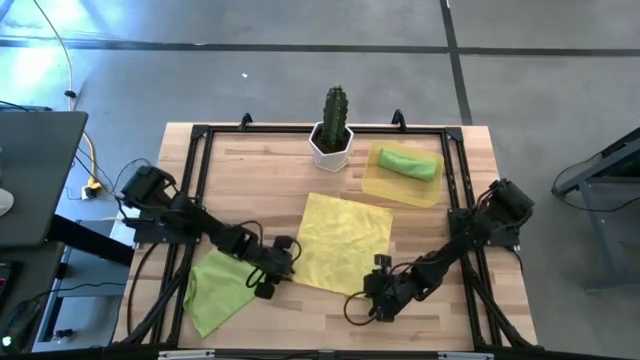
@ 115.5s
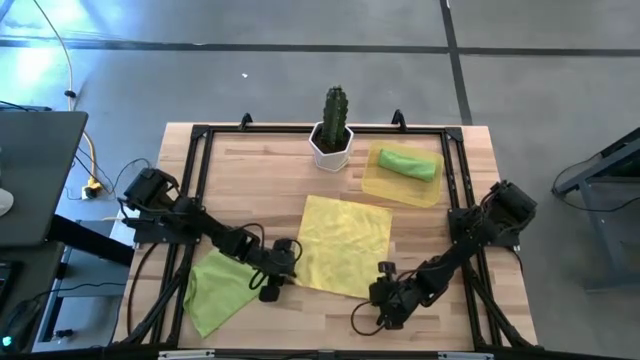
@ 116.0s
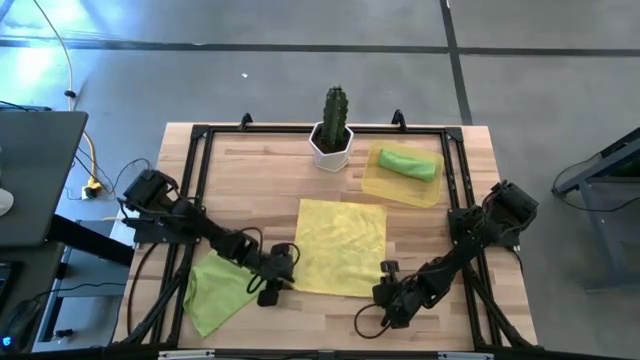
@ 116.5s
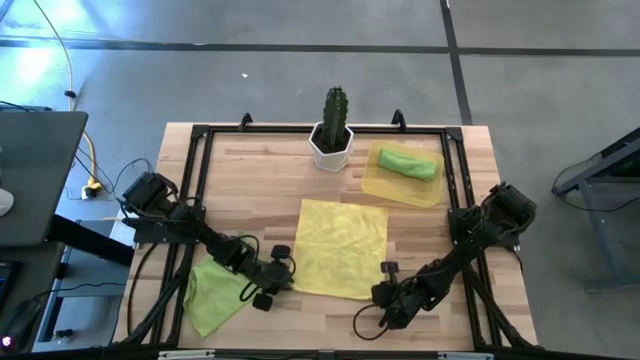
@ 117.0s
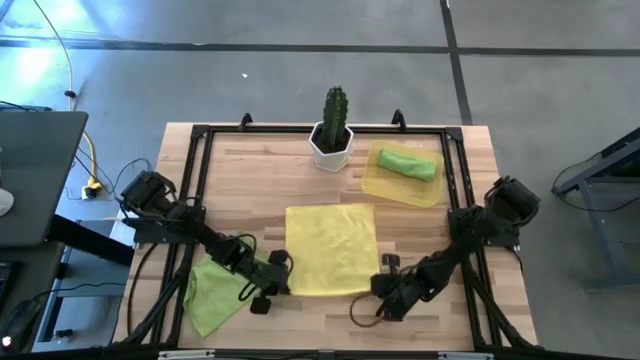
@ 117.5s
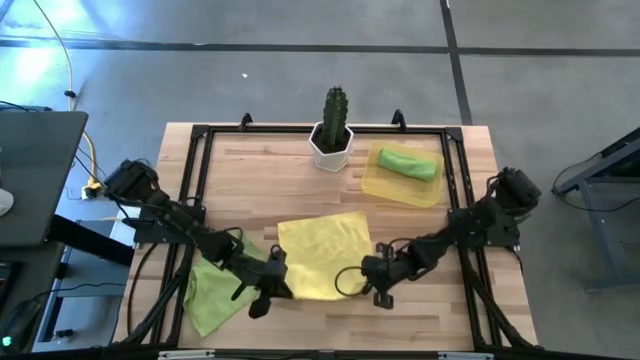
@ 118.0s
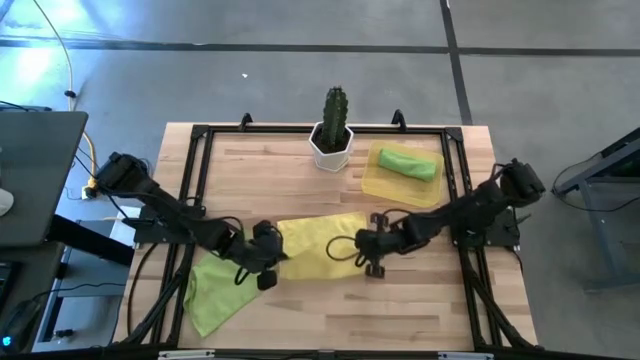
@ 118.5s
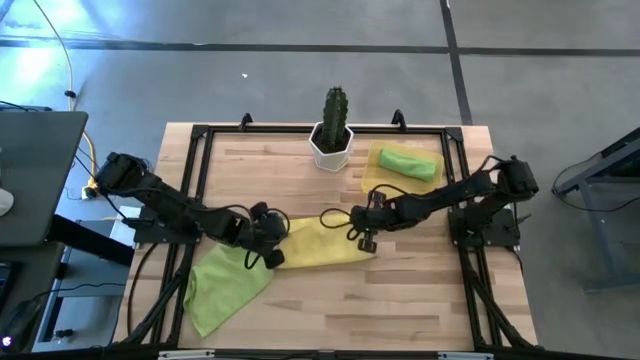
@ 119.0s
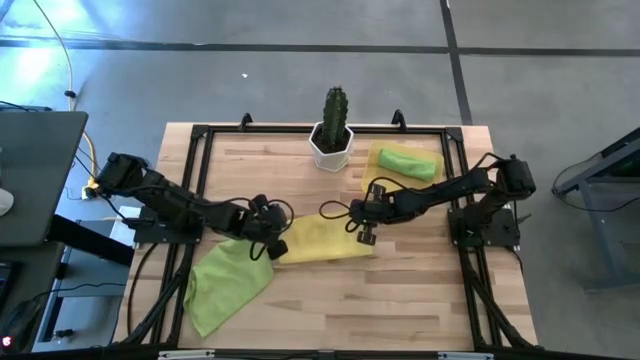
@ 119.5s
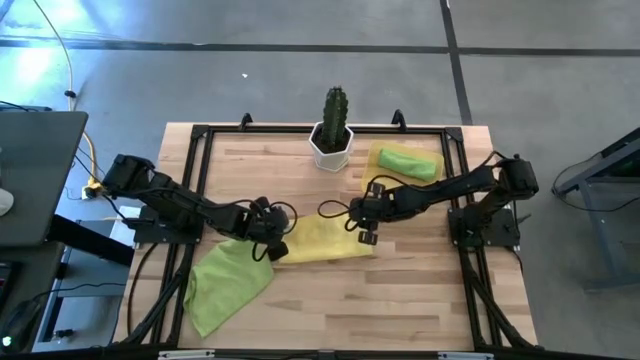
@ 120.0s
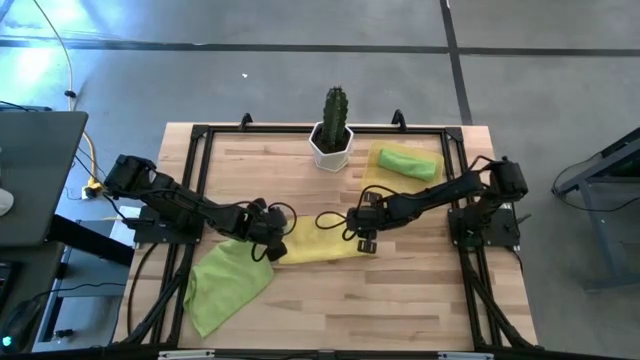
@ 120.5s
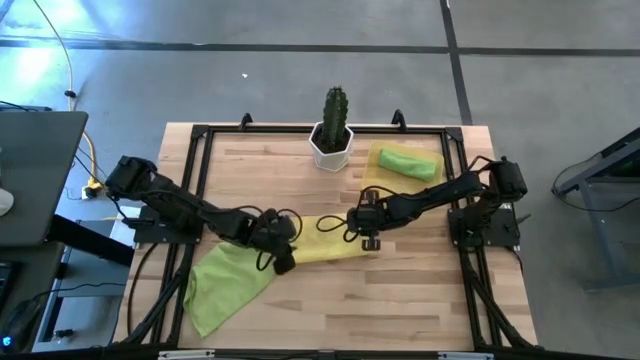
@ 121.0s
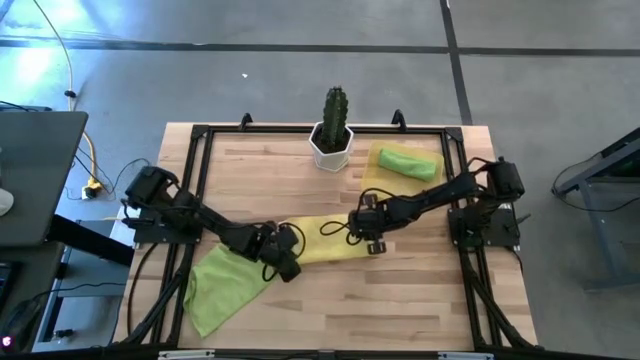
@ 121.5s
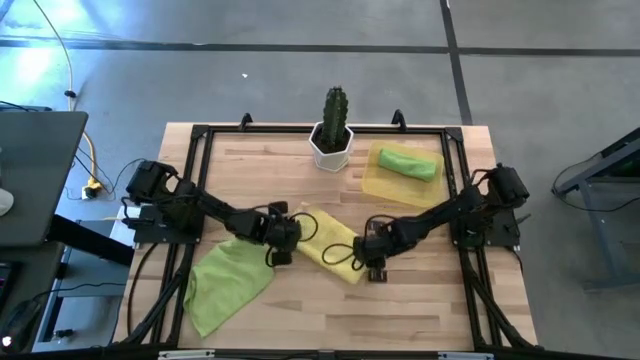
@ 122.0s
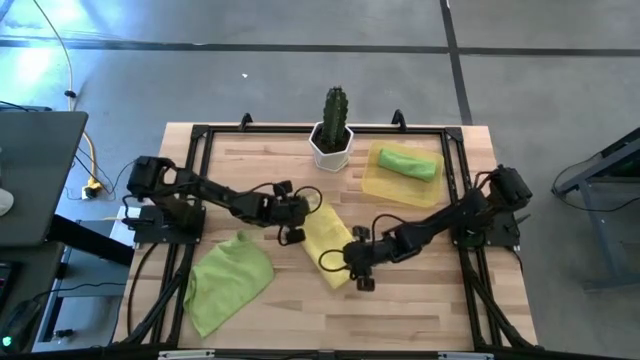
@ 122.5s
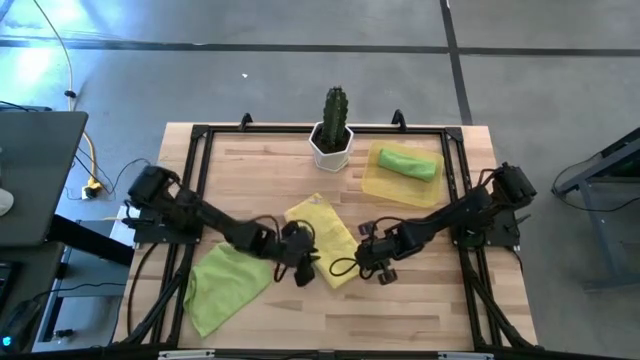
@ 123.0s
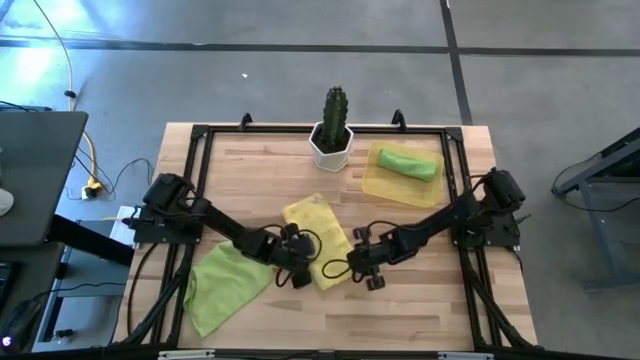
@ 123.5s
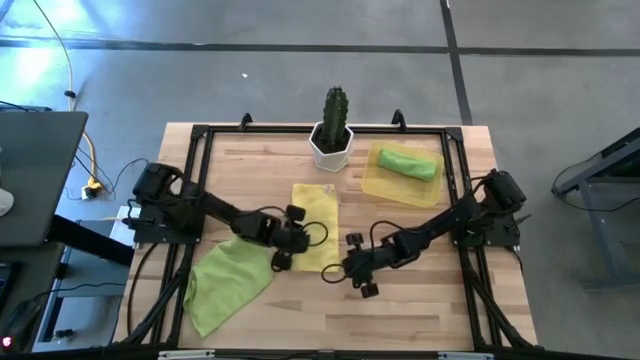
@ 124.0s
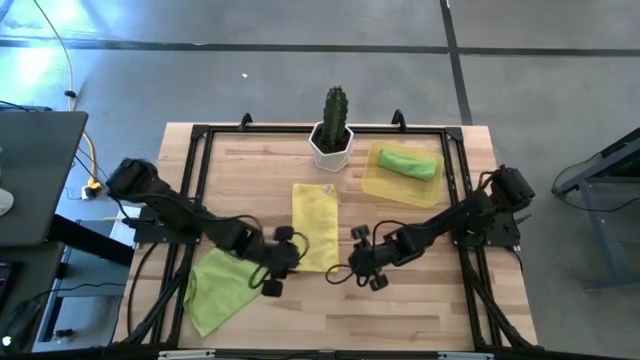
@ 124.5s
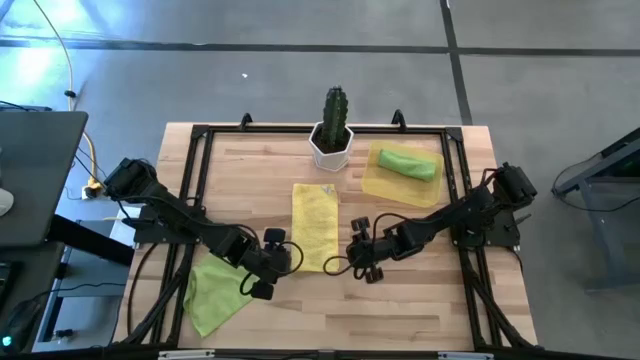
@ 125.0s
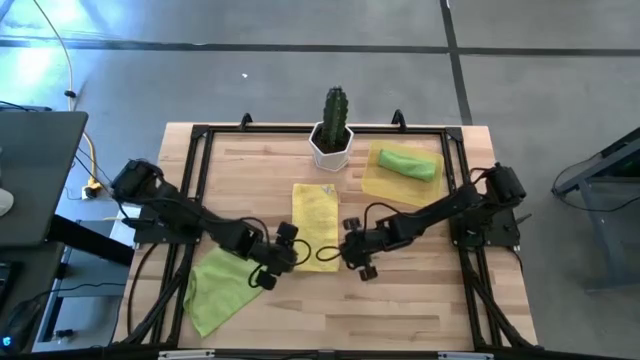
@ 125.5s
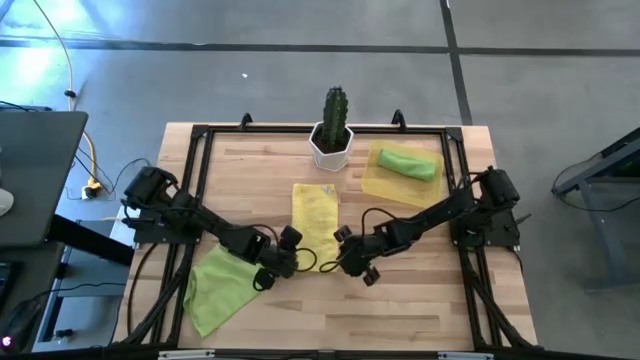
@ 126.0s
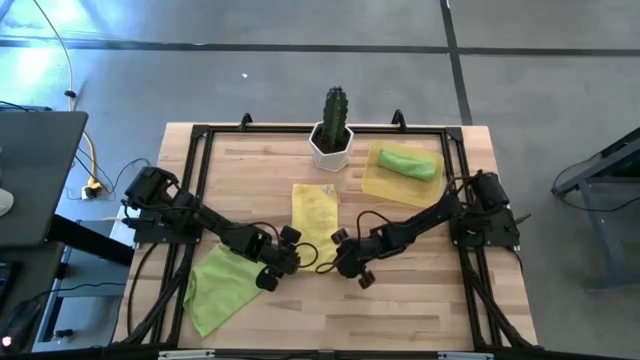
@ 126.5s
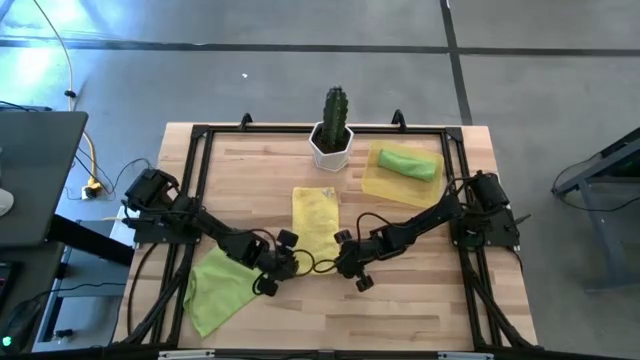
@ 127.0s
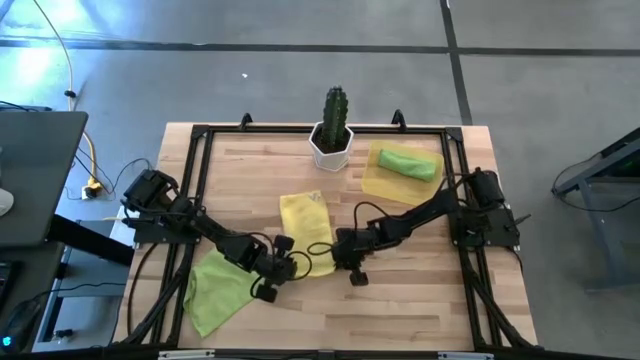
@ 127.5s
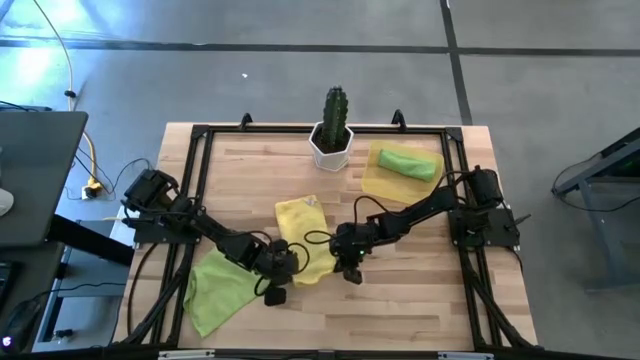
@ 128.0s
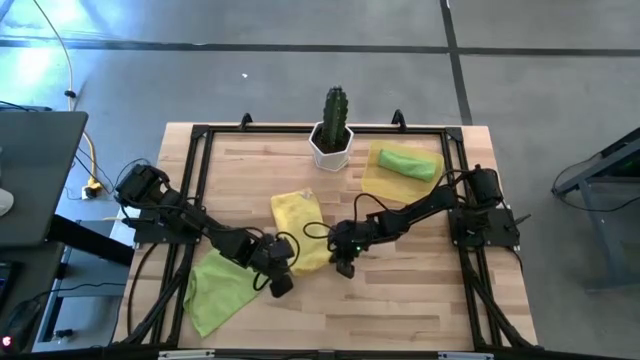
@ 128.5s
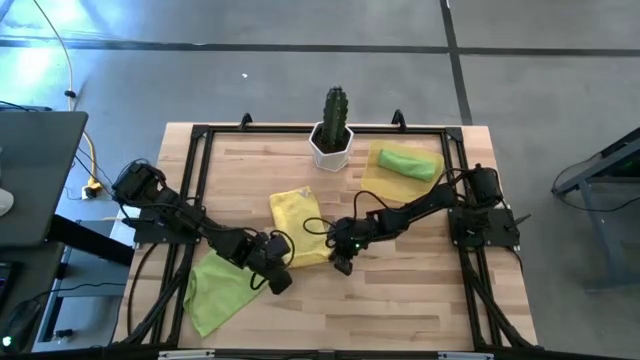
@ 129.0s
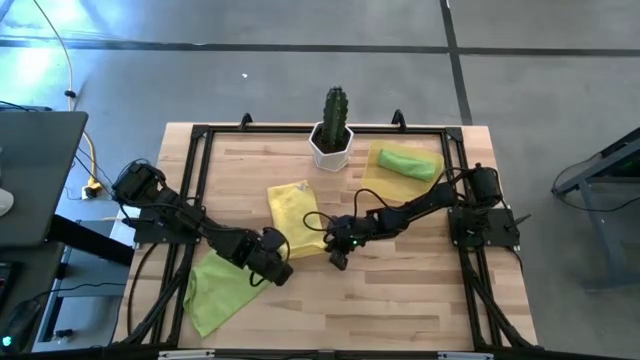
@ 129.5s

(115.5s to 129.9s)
Task: Roll microfiber towels into tight, uniform cylinder then place into a basket
Roll the yellow towel

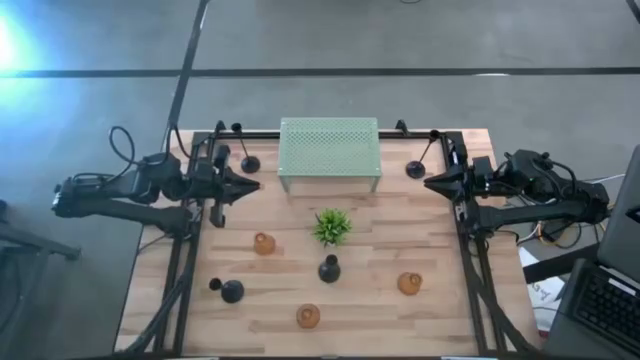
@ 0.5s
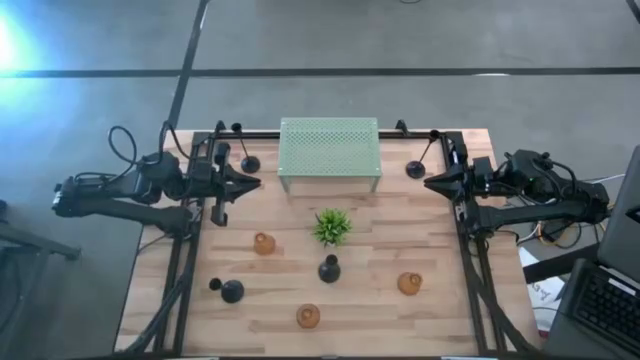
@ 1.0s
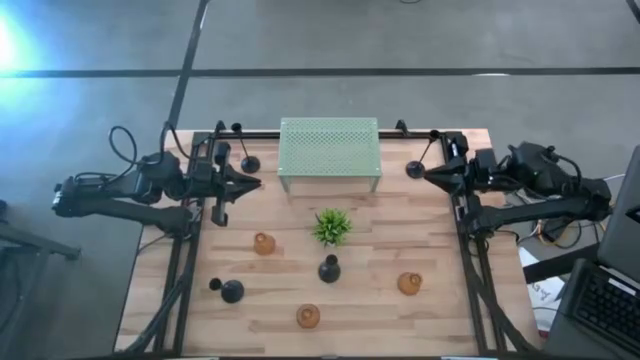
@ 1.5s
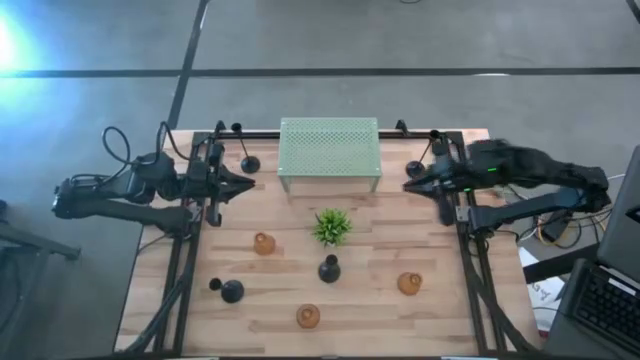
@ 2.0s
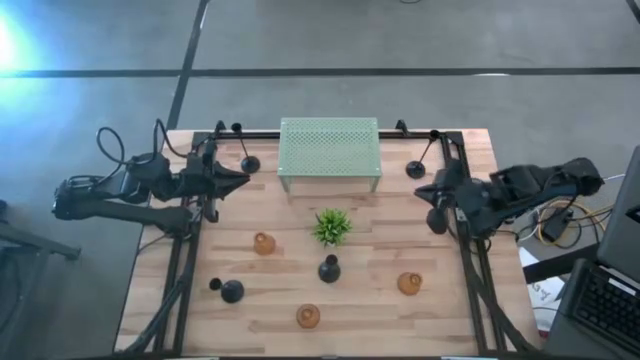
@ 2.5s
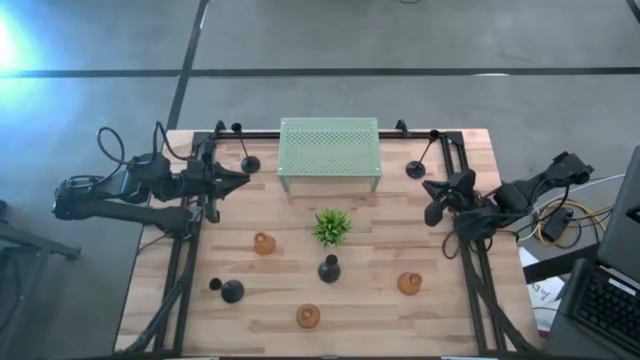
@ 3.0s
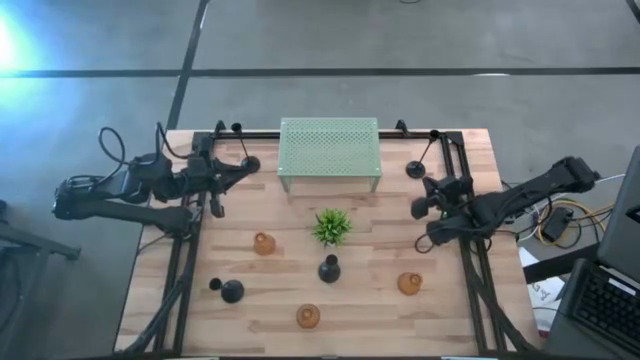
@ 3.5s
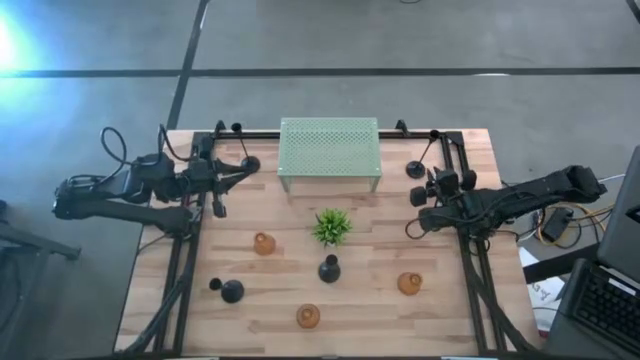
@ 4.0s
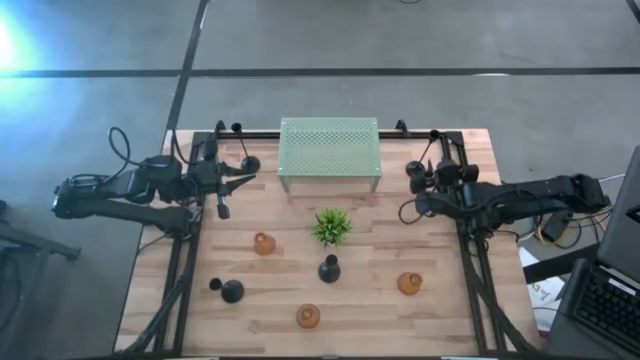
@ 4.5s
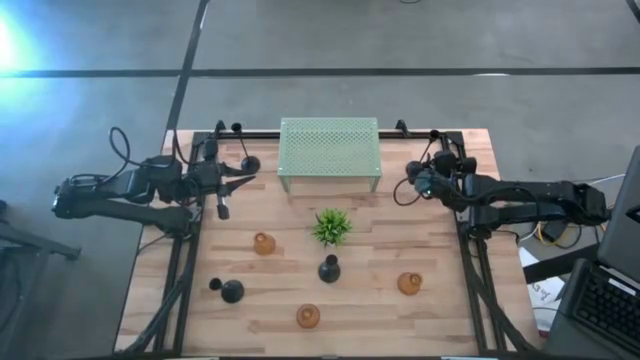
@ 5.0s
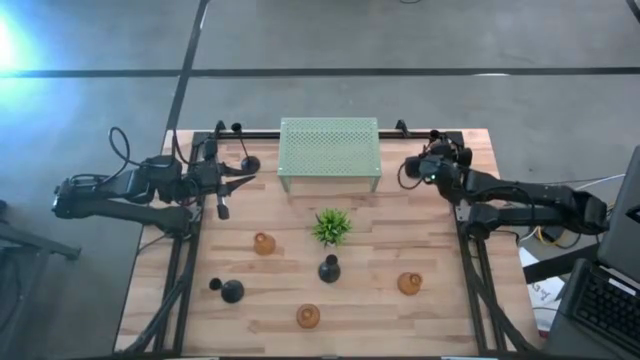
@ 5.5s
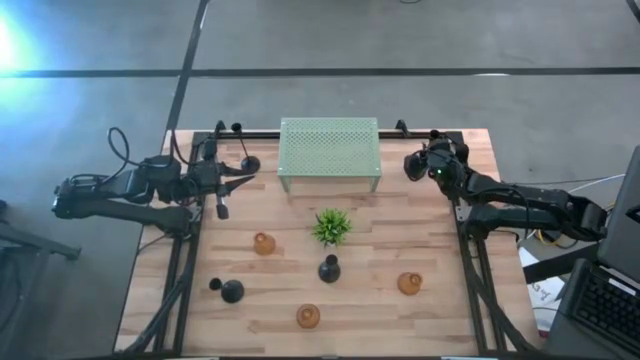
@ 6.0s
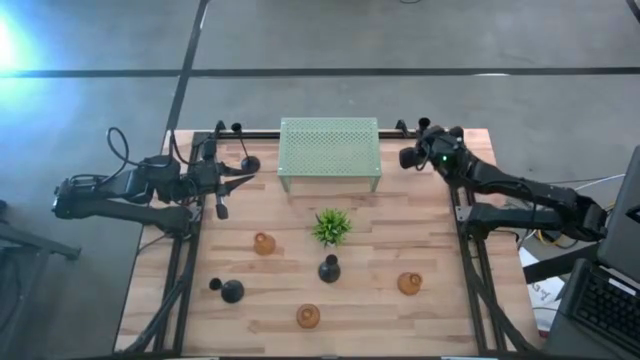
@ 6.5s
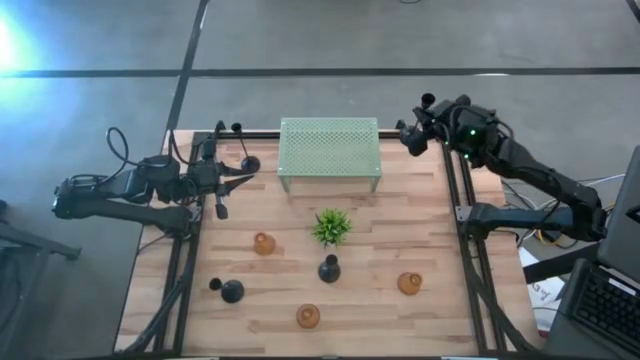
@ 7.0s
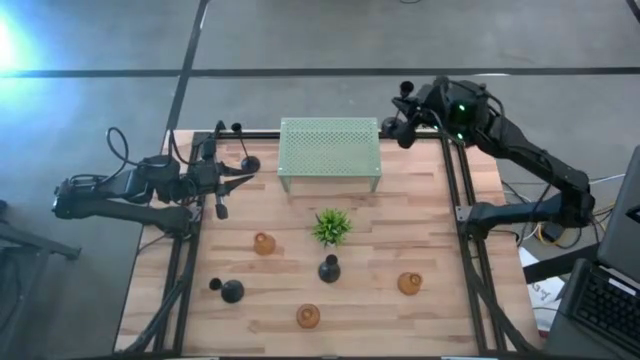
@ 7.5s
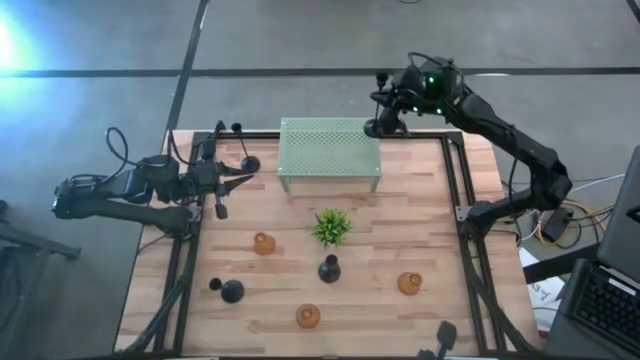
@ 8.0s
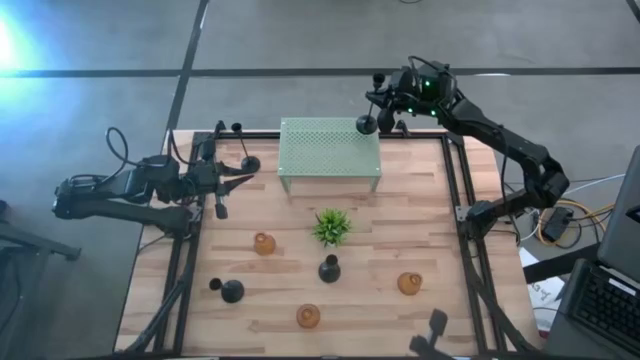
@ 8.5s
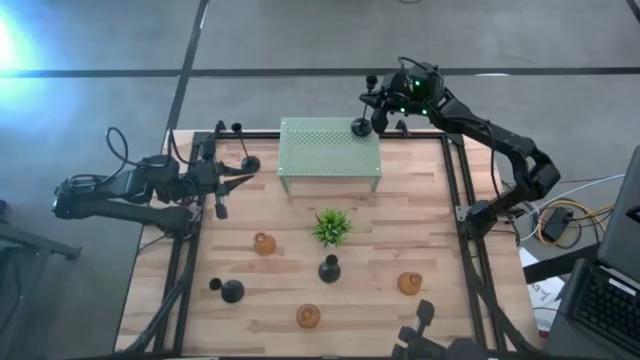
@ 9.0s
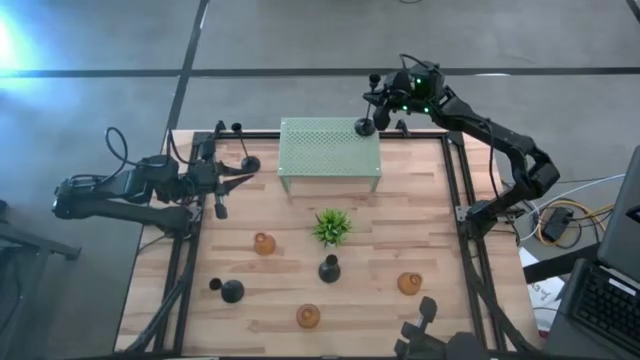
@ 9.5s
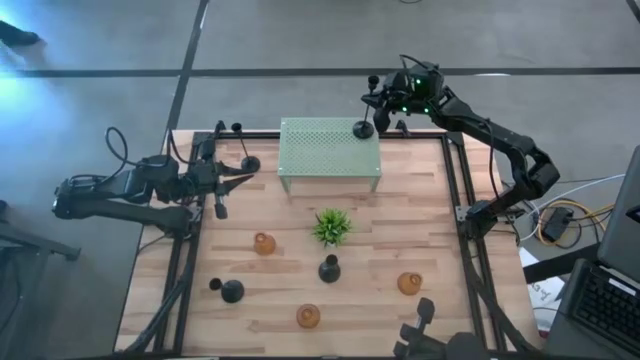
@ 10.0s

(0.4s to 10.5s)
Task: Pick & Place candle stick holders
Put the black candle holder on the shelf
